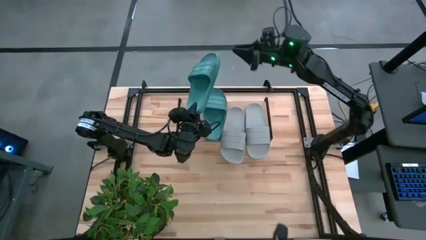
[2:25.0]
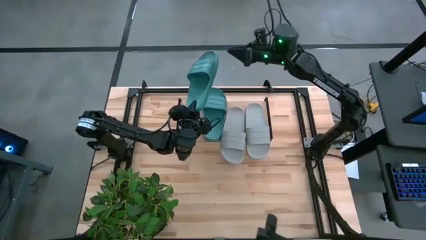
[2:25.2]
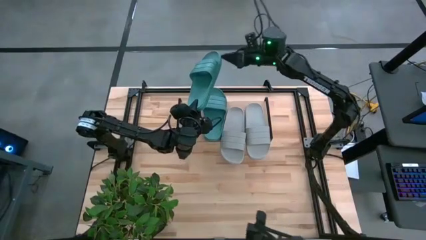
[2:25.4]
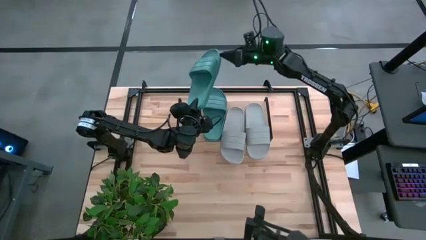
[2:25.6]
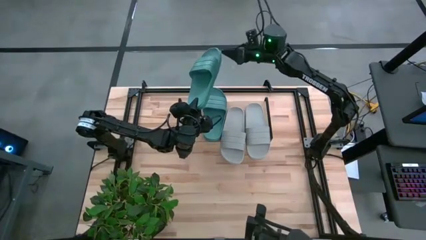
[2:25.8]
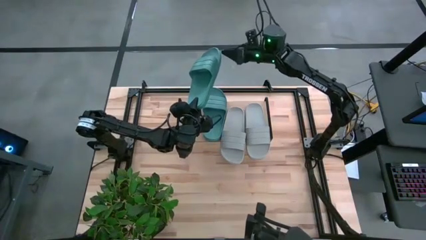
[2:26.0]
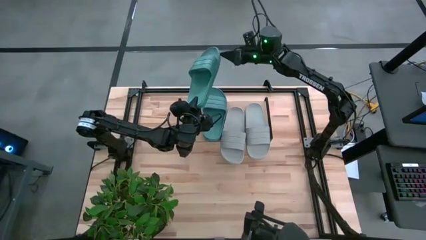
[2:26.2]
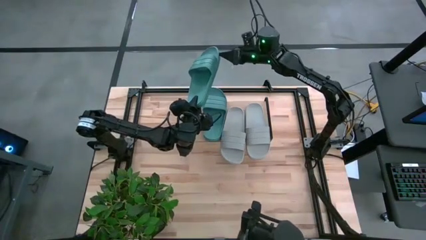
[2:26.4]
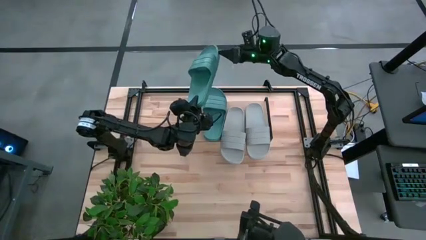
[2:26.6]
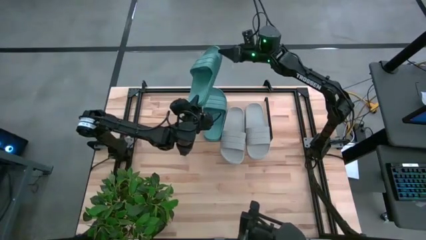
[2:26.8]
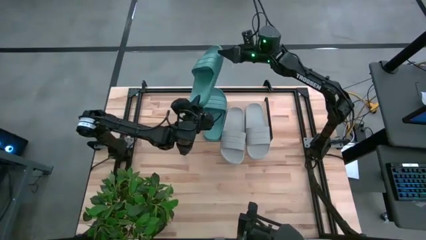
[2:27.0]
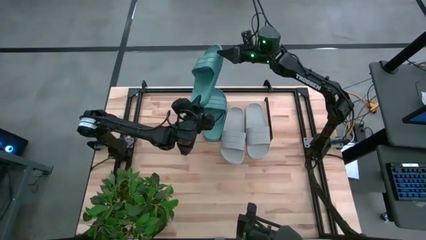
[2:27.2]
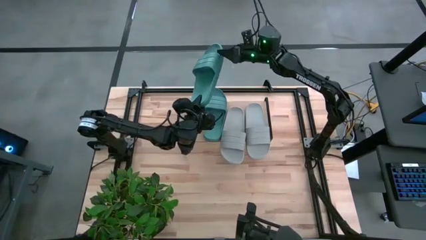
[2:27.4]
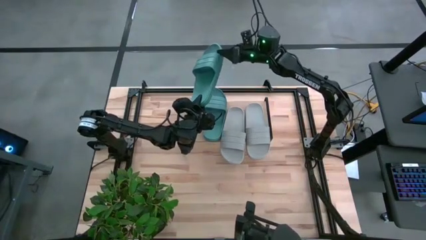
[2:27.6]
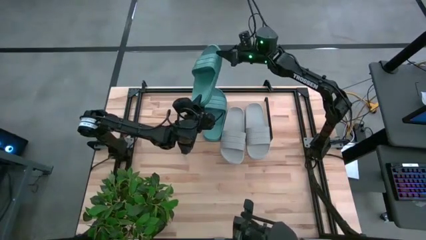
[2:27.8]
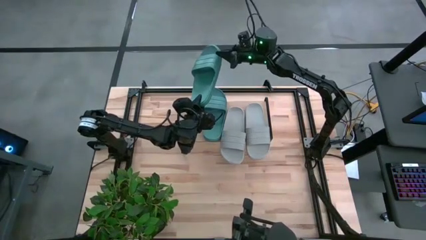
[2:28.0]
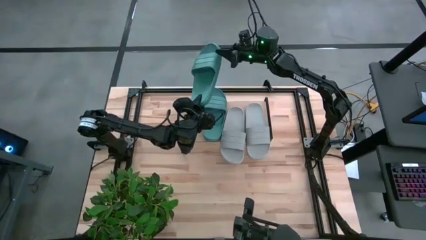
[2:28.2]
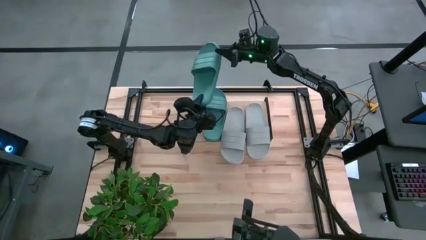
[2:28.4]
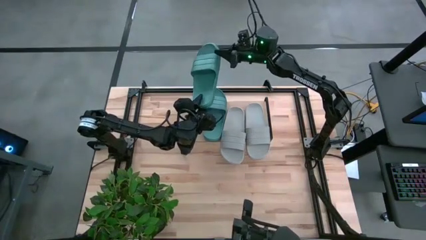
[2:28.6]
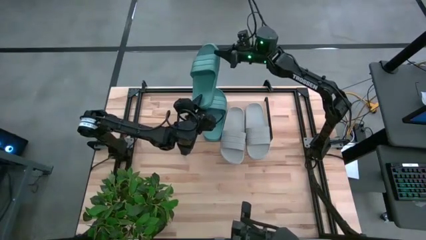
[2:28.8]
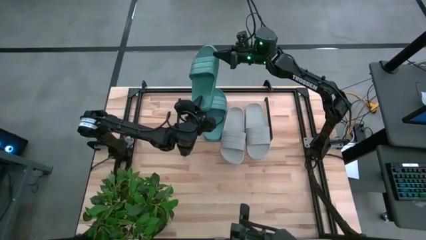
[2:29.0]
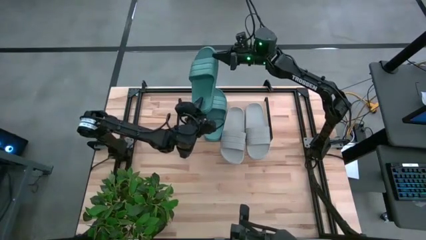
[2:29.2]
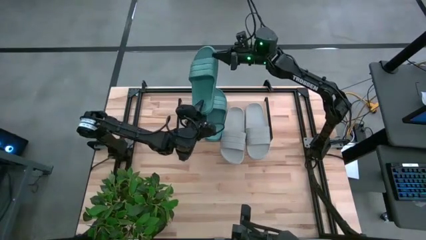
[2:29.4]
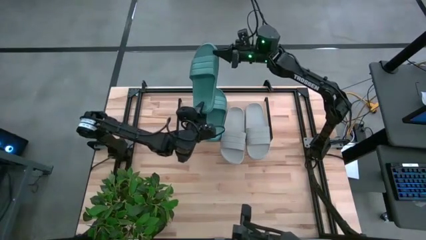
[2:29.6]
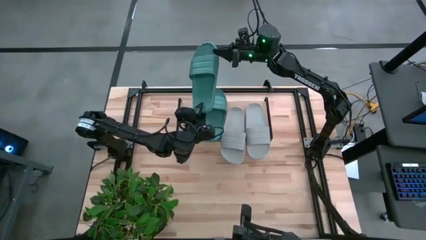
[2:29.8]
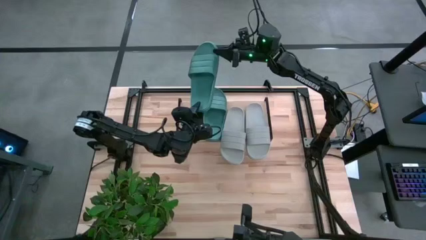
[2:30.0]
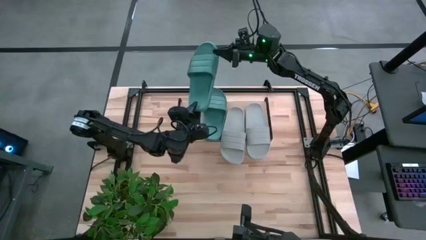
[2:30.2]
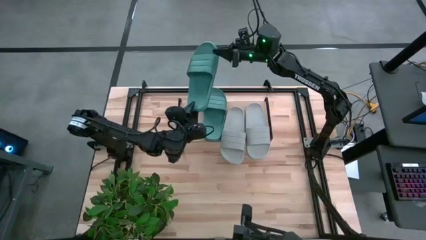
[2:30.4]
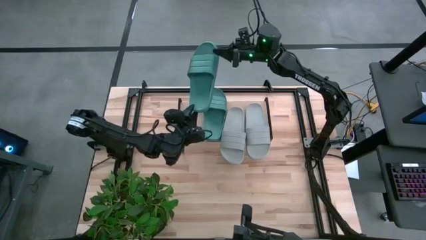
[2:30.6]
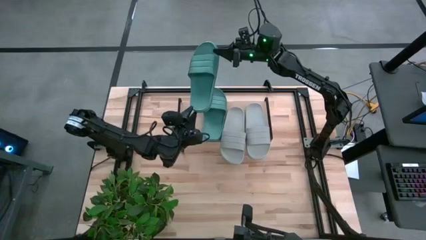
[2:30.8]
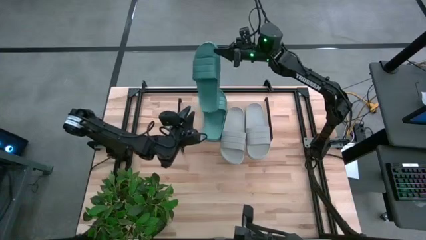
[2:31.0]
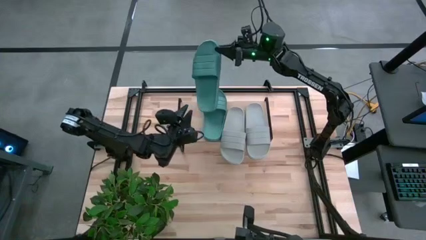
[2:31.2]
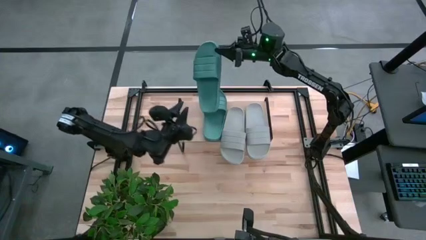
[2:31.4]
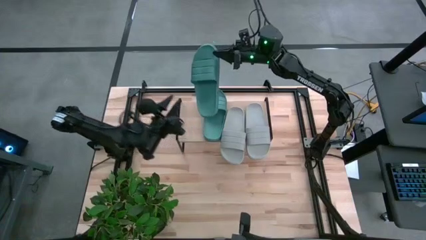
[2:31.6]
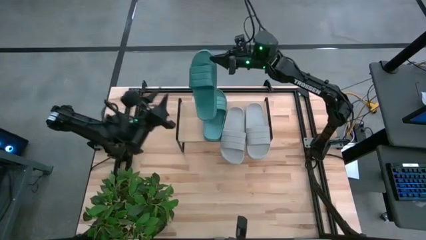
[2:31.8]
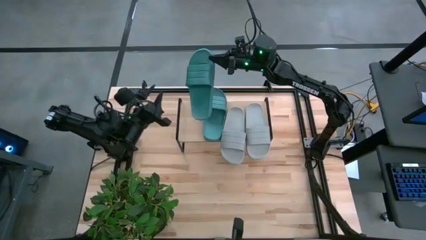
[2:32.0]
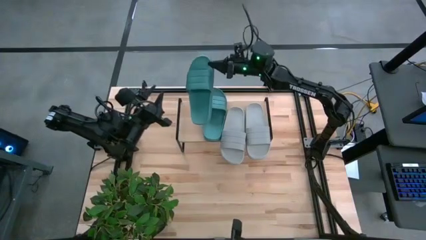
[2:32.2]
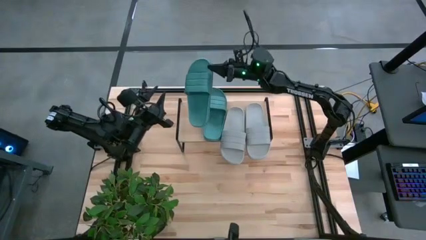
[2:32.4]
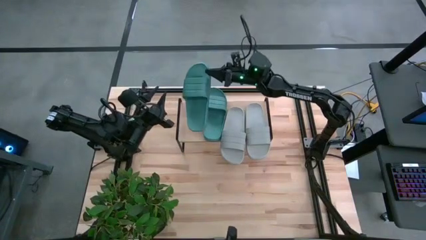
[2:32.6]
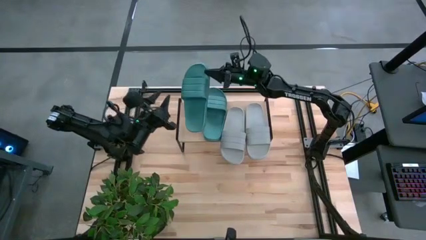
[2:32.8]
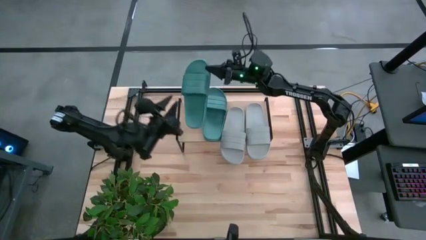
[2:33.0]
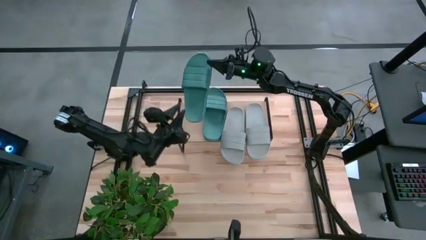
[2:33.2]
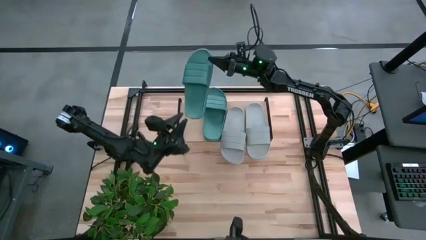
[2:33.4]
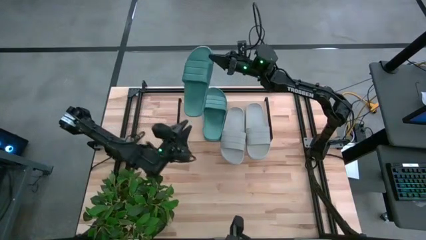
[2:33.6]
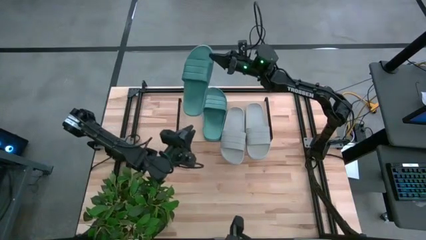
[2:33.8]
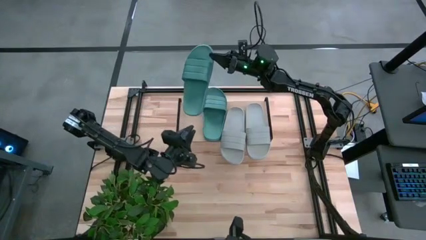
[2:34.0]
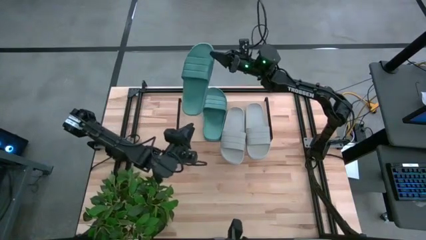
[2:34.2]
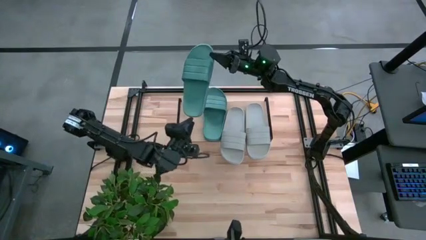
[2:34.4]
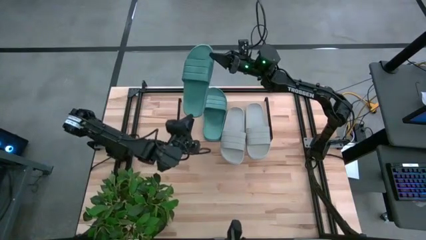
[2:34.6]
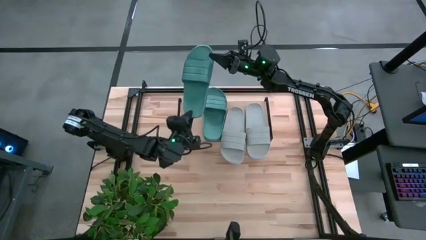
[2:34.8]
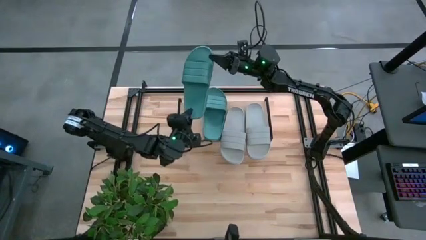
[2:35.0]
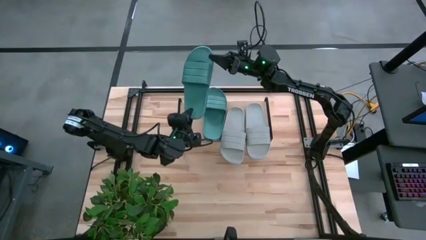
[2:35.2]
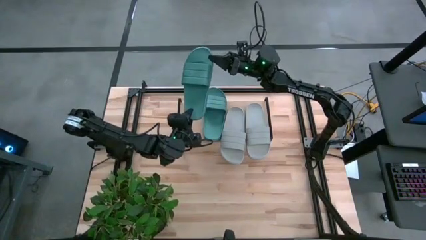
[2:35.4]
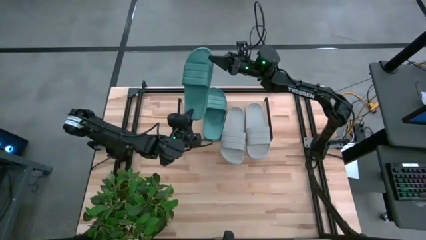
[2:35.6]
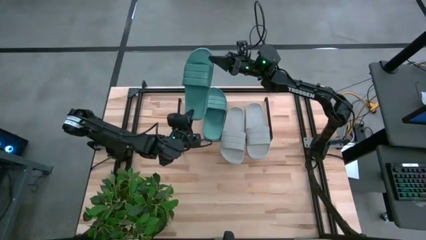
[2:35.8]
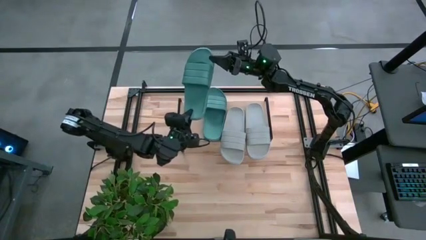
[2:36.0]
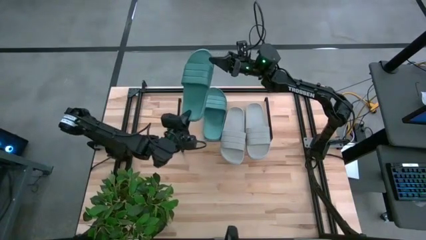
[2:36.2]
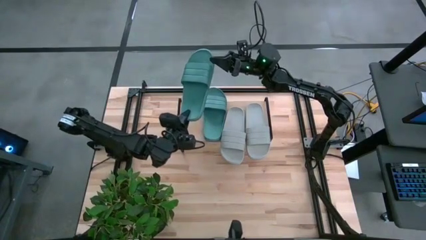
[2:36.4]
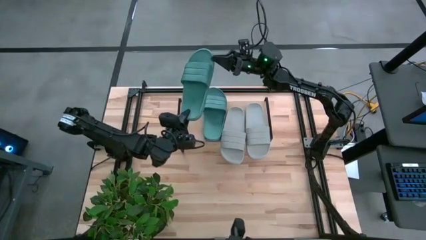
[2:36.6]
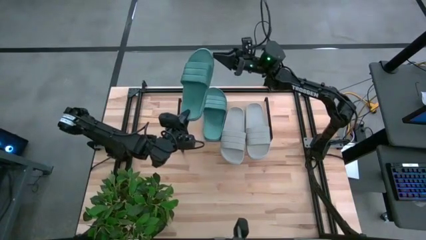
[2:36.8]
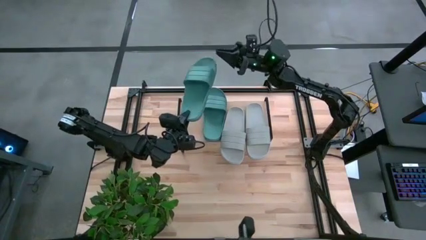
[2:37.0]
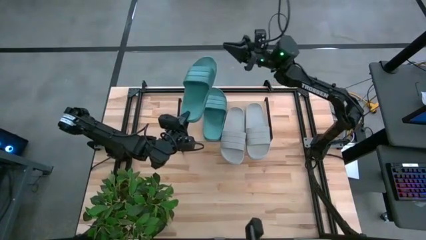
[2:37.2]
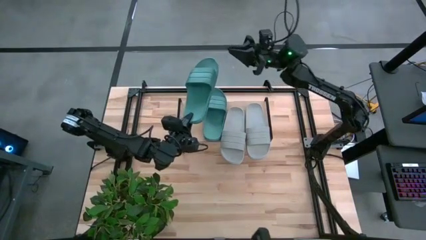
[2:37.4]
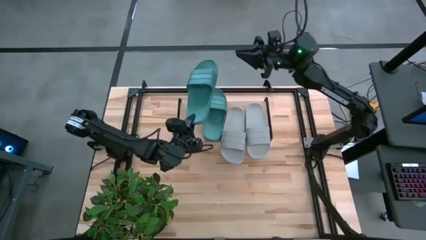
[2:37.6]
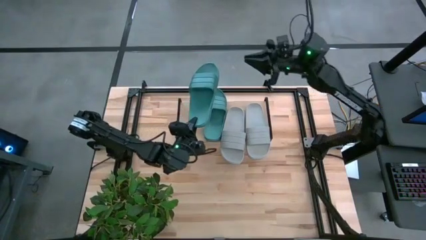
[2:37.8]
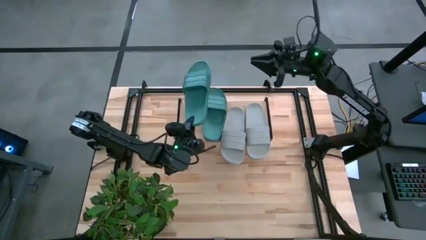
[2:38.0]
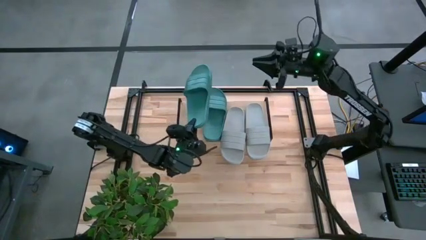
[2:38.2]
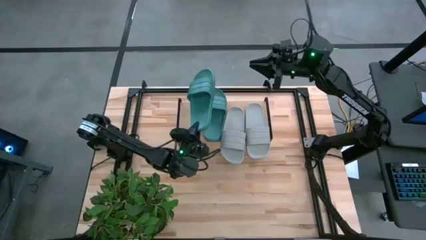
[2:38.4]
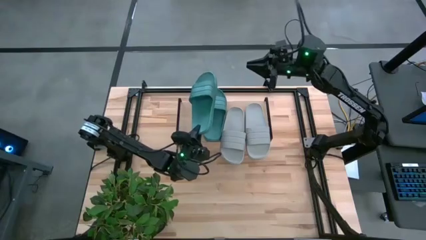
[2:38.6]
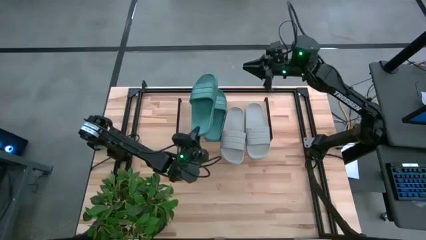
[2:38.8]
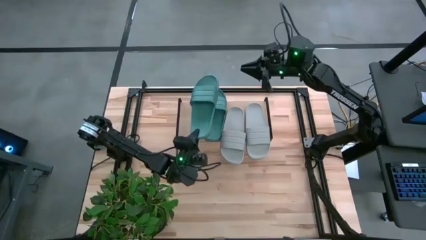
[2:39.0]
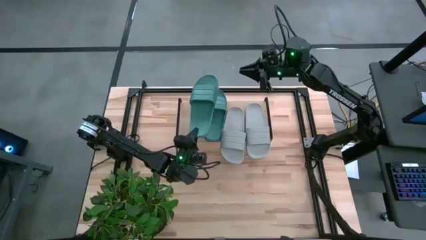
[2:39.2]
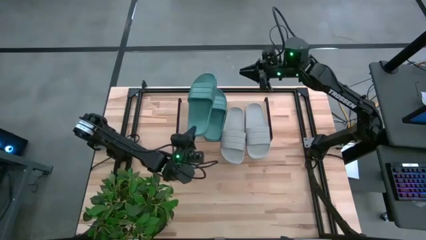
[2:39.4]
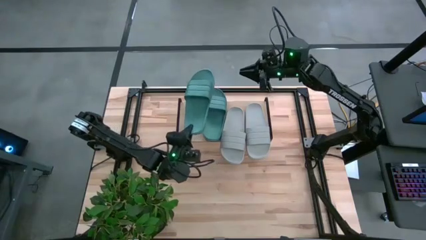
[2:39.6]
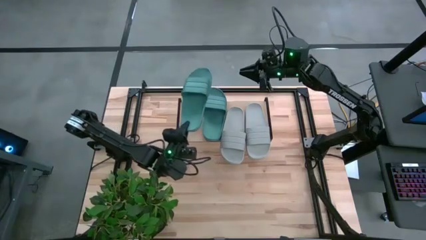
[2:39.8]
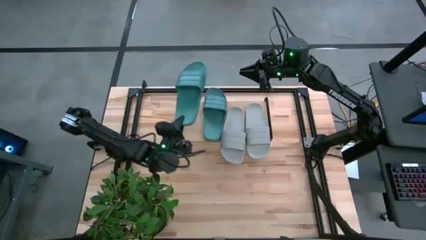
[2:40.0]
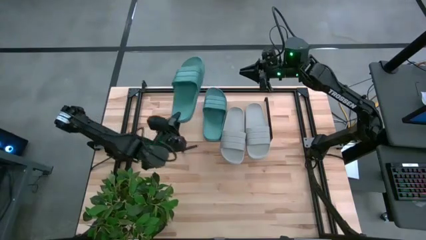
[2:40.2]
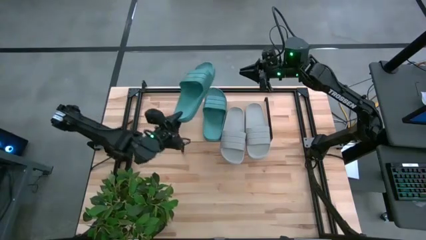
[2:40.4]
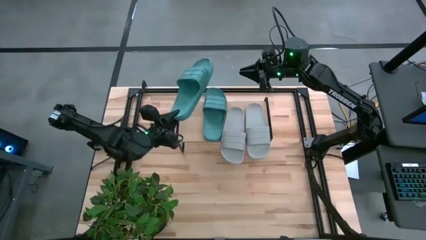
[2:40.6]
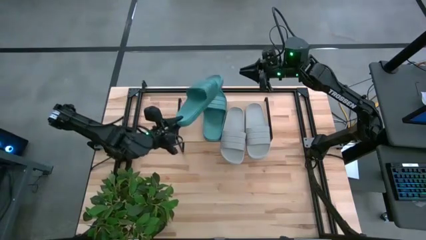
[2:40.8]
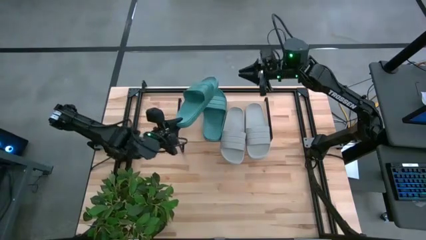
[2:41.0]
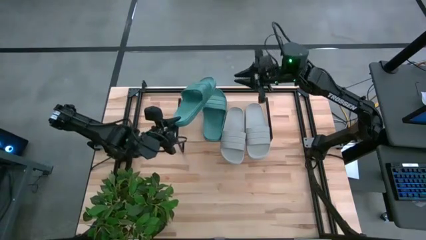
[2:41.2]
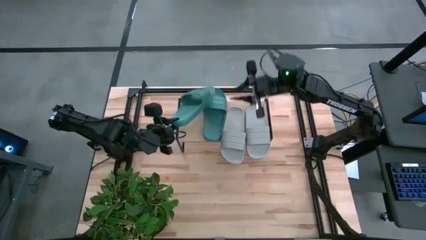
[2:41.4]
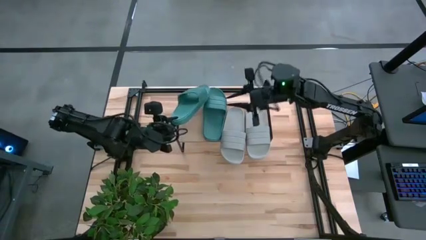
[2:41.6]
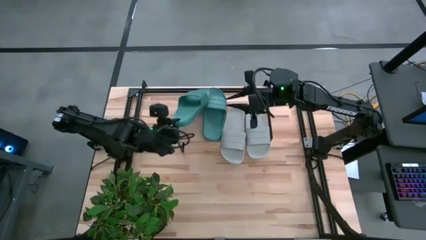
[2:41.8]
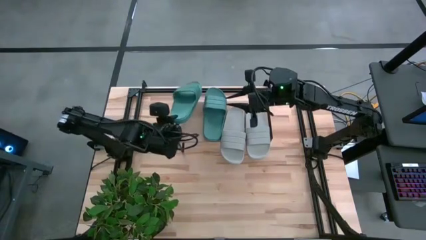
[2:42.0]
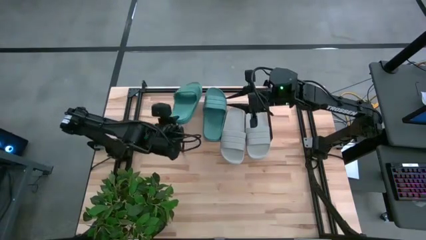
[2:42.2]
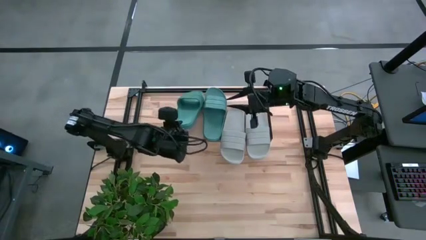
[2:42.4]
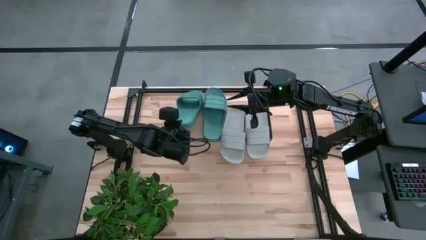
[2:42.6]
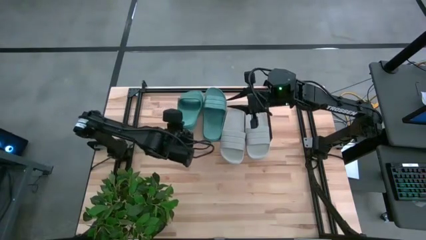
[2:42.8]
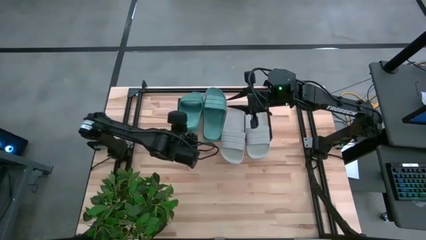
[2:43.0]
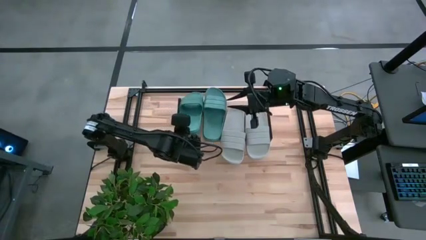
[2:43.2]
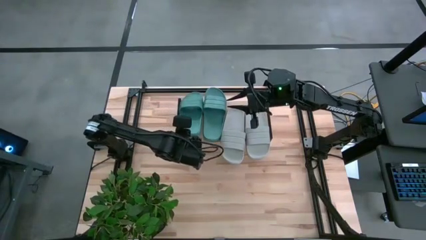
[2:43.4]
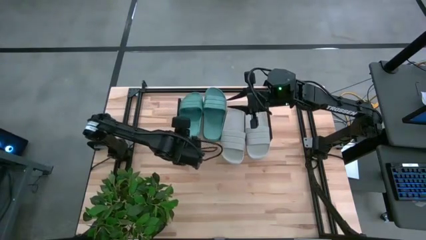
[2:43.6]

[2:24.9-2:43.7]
Task: Pick and place slides into the shelf
Put the green slides on the shelf
